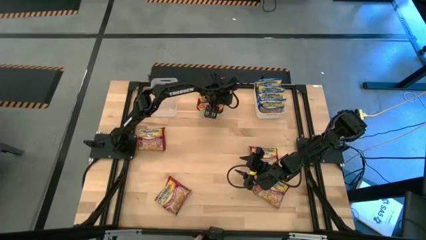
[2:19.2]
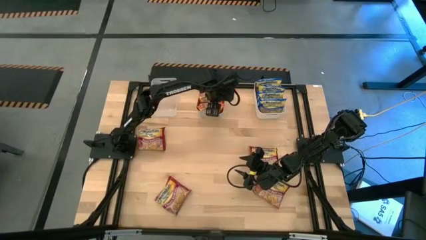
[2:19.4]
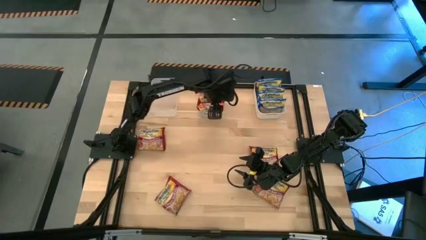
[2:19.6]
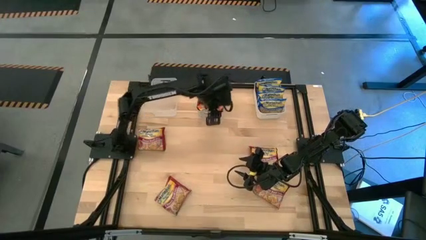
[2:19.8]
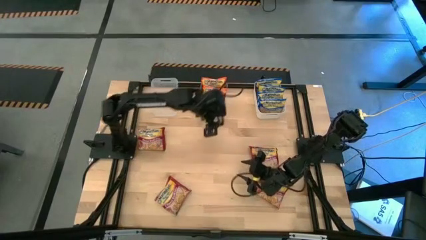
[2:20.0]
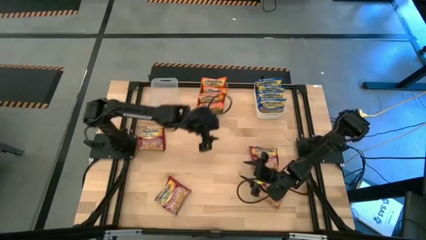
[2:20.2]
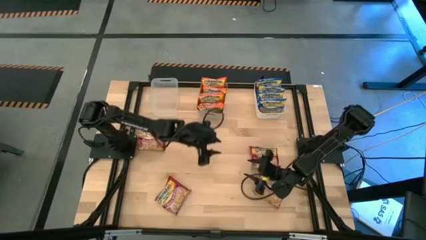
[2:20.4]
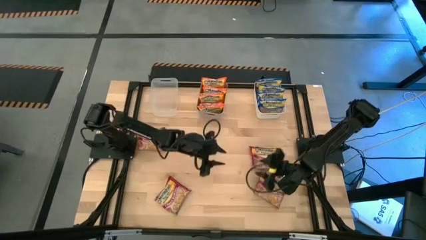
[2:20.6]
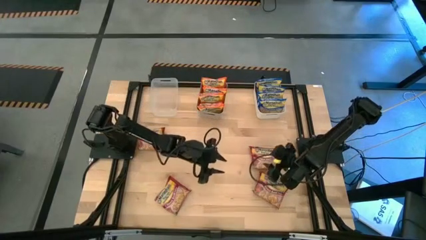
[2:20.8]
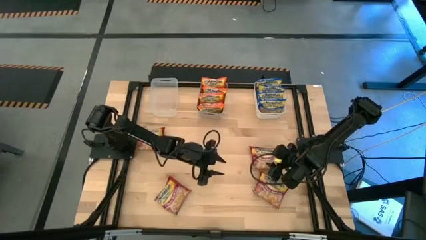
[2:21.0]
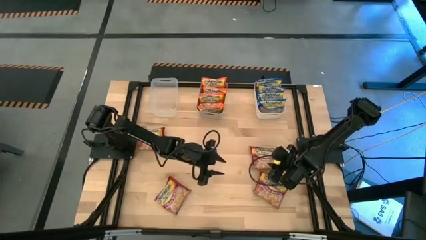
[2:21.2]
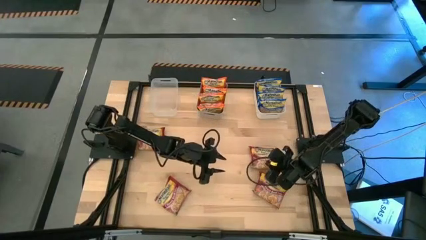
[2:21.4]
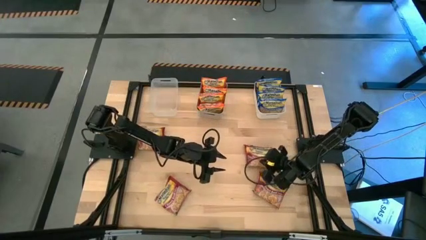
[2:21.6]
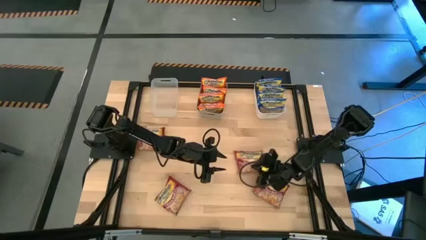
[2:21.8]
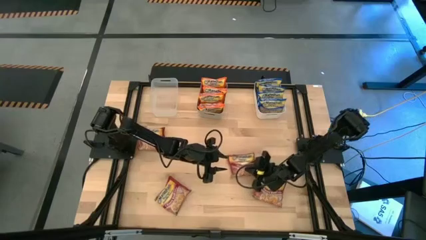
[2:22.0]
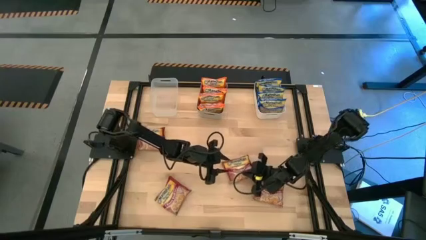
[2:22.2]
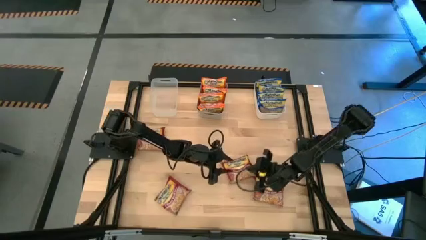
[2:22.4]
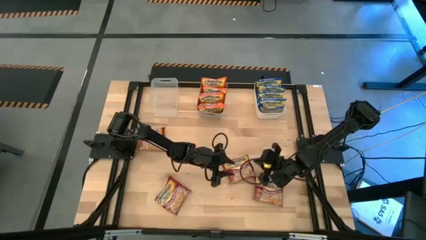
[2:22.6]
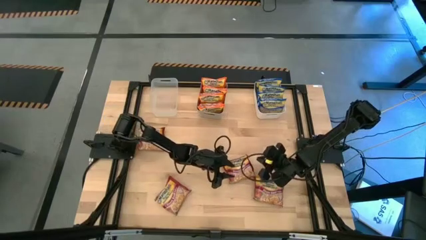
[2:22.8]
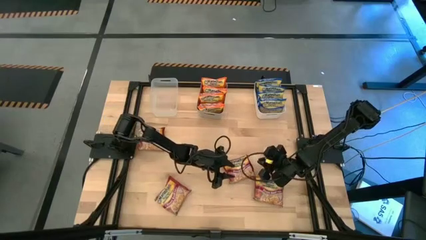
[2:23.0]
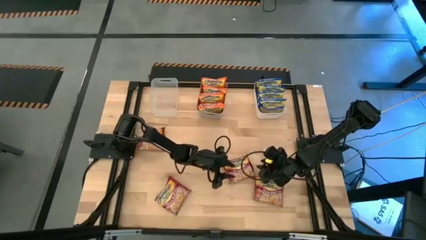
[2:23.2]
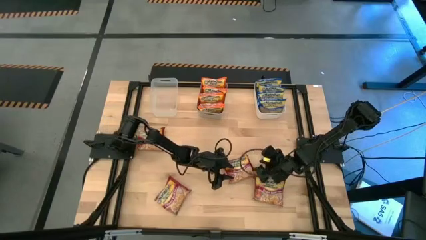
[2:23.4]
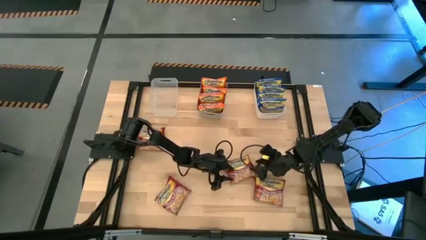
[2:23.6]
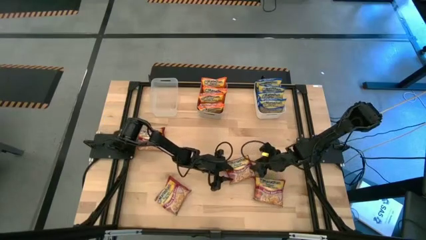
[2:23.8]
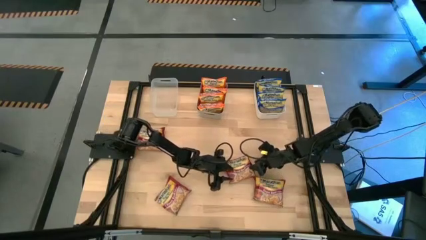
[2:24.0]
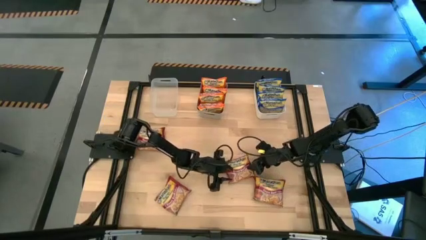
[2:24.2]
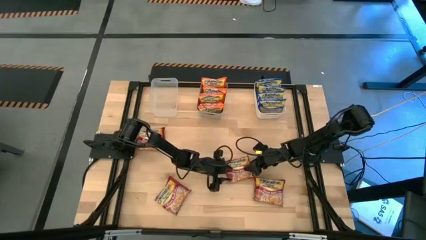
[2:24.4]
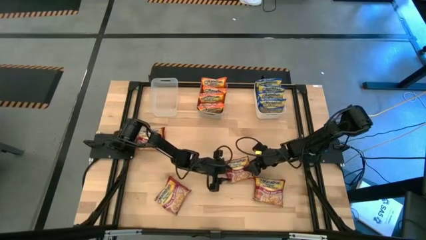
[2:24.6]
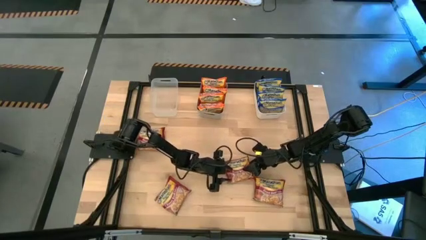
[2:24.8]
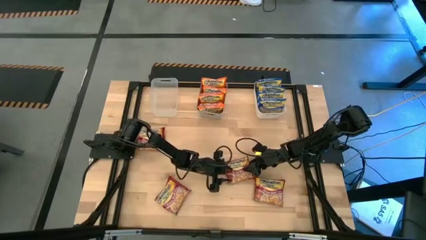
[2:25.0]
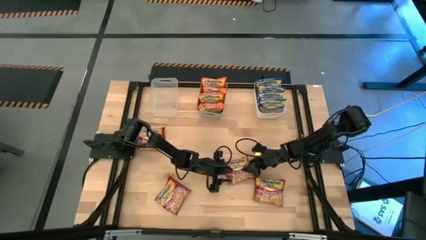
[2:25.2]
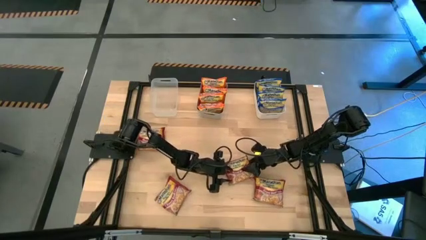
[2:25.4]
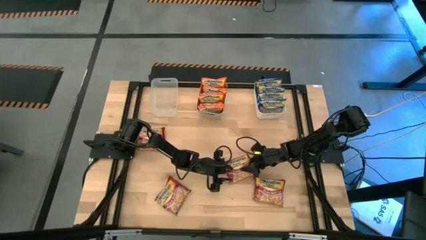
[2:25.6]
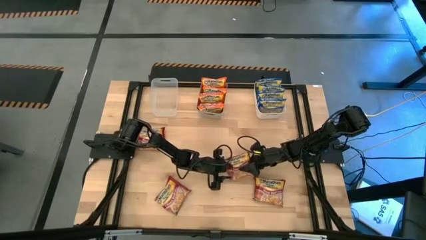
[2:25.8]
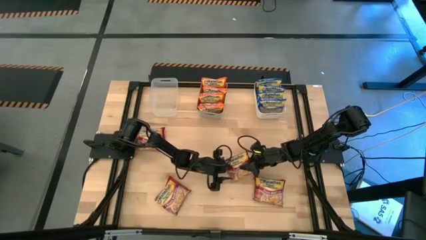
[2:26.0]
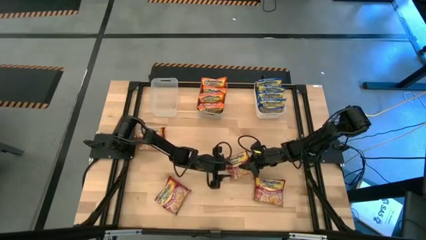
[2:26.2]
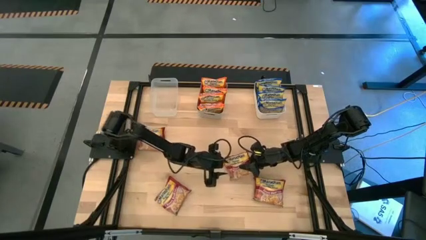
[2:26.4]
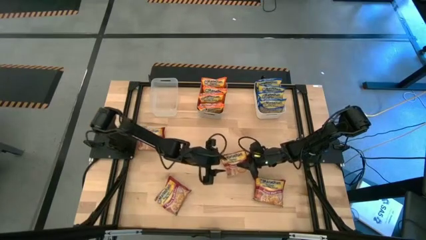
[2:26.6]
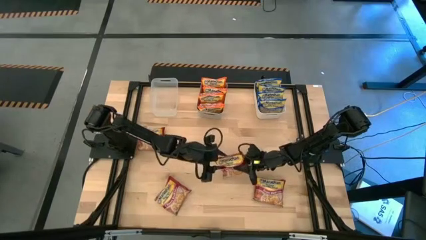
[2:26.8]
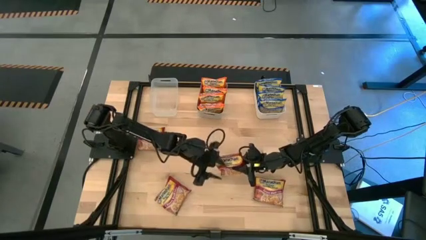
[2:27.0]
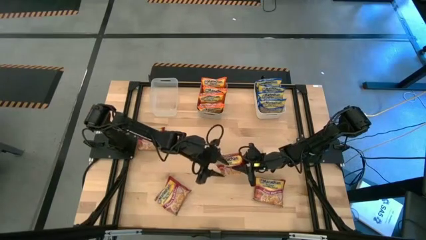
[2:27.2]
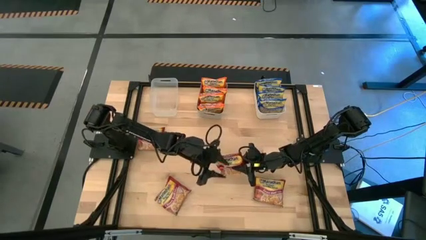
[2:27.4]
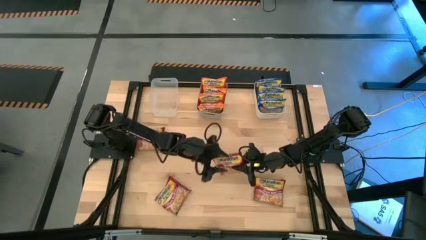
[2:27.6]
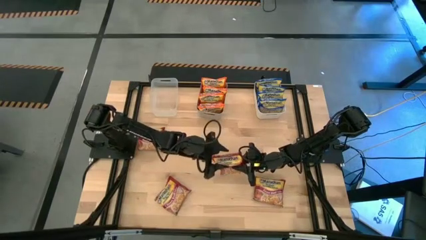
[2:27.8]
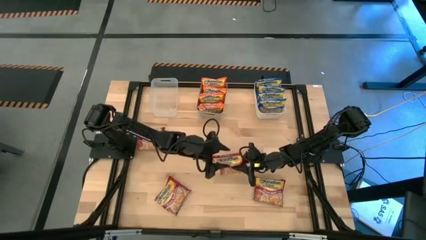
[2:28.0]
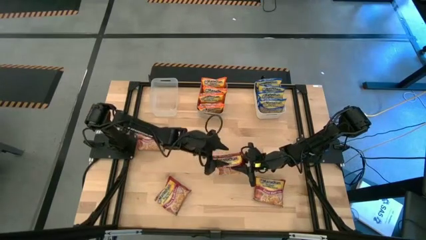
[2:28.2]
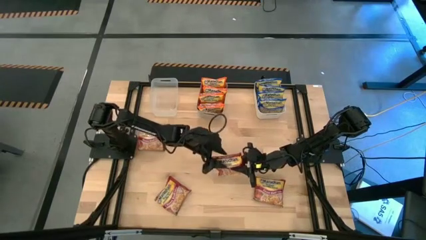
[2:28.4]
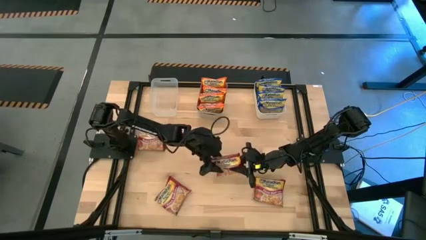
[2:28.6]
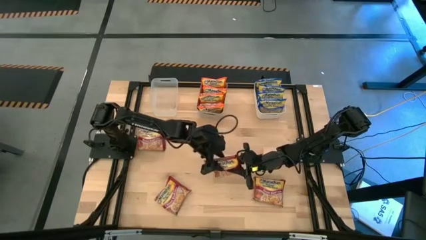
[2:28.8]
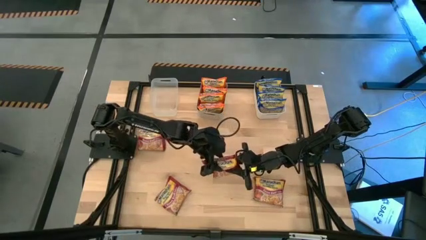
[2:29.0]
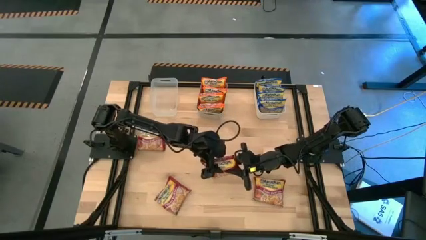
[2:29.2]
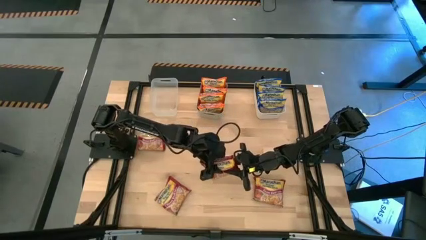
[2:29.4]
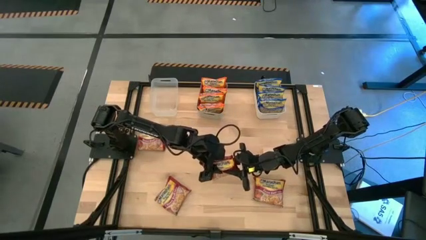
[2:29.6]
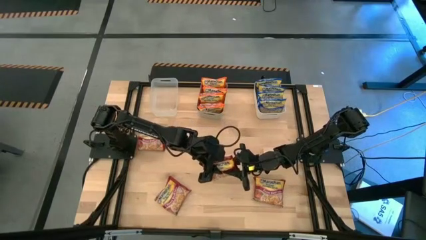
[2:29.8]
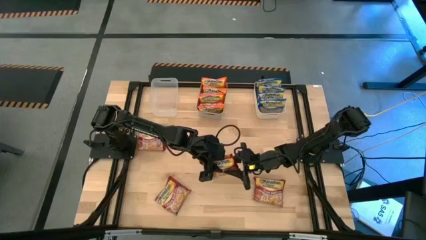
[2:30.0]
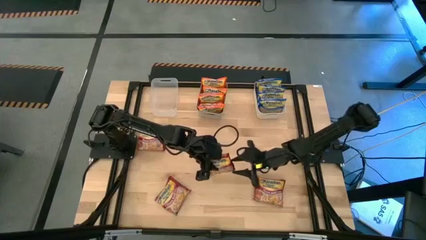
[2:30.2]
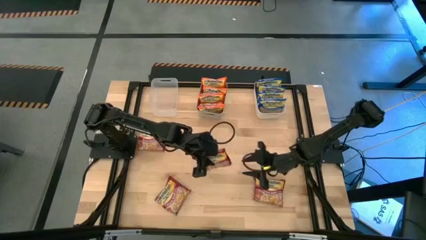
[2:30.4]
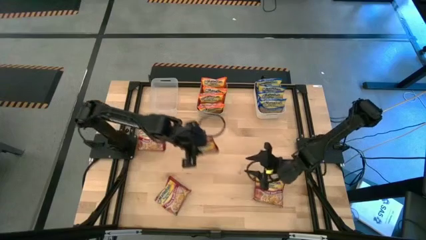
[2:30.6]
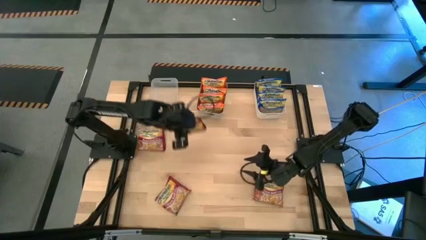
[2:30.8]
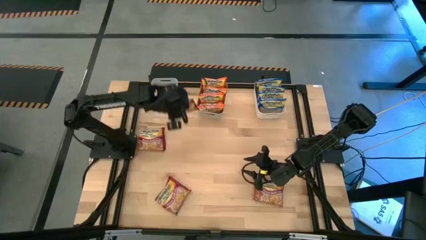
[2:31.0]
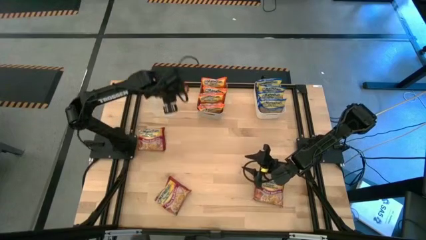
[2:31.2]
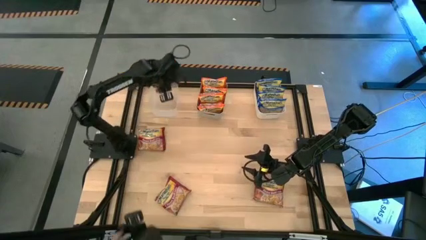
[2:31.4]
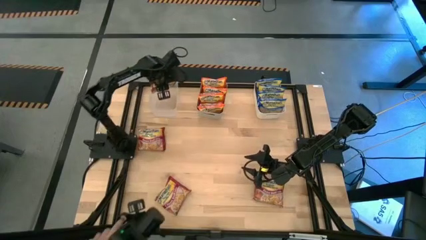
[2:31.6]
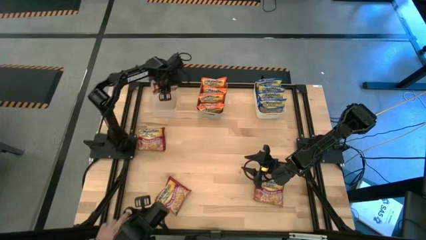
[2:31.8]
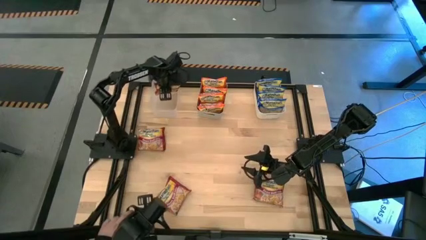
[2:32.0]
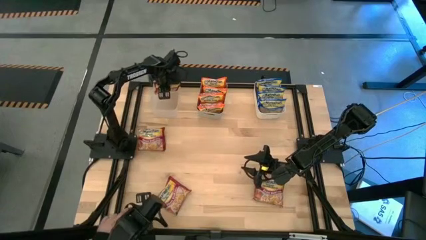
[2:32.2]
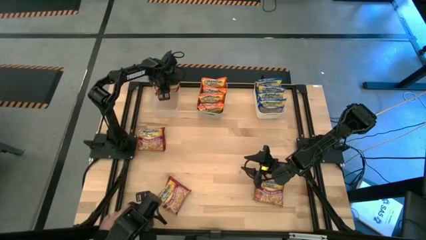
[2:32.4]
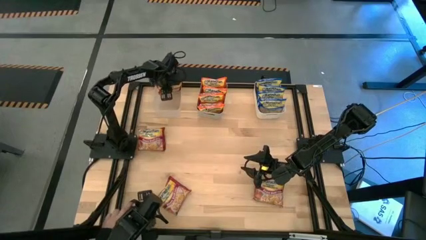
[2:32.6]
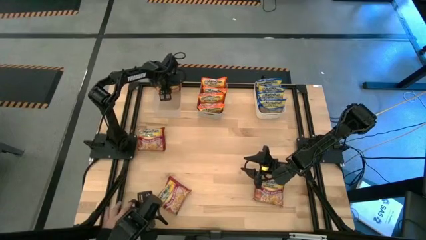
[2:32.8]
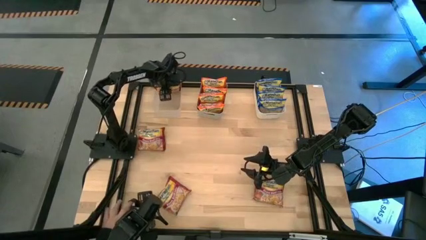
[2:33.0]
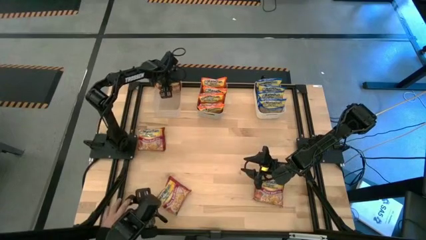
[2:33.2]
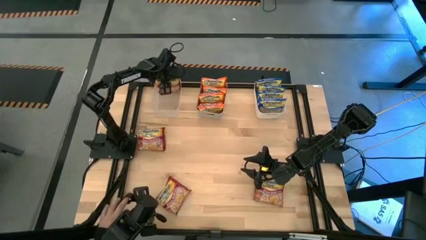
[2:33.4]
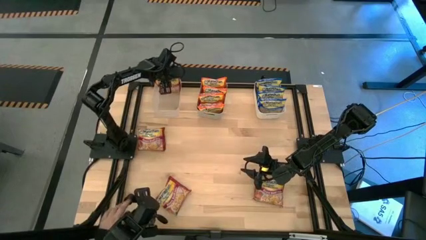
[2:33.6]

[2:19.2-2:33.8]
Task: Sort Maruchan noodles
Put the red noodle pack into the transparent bin

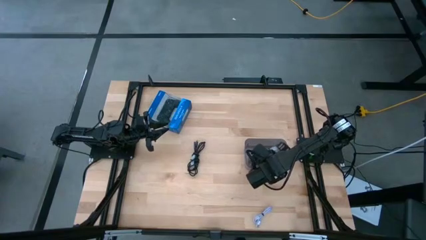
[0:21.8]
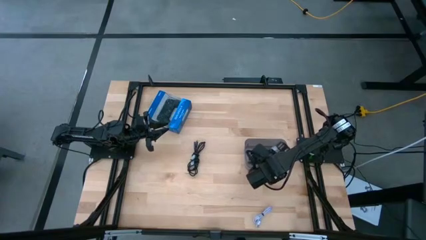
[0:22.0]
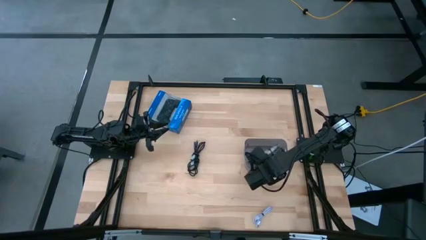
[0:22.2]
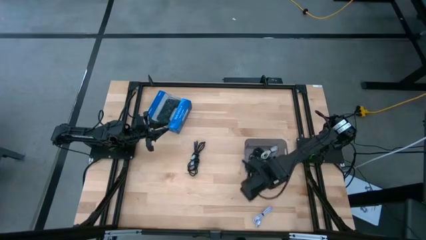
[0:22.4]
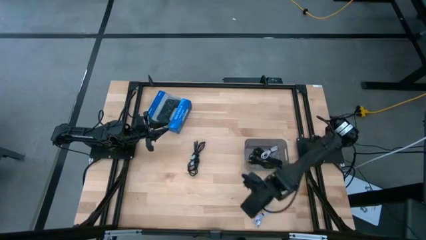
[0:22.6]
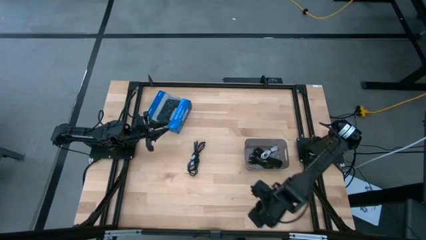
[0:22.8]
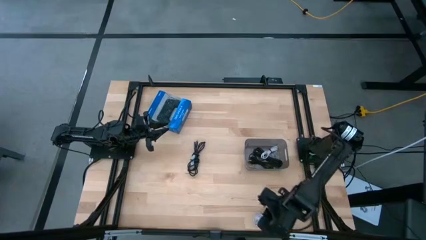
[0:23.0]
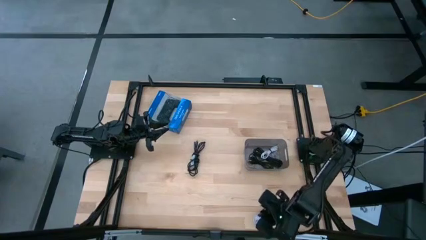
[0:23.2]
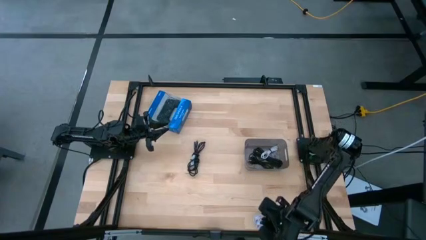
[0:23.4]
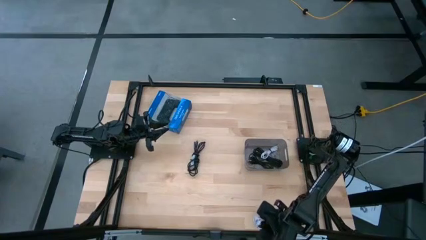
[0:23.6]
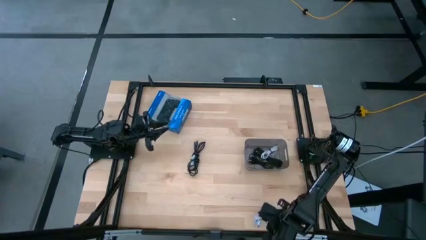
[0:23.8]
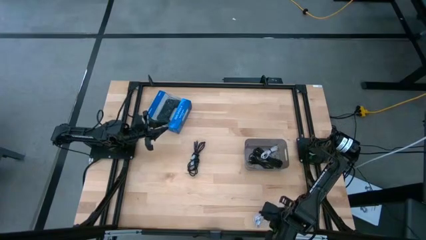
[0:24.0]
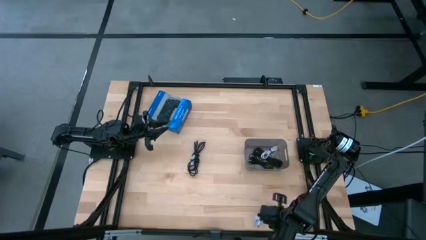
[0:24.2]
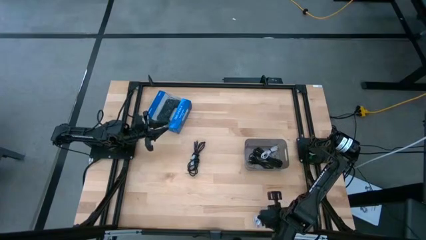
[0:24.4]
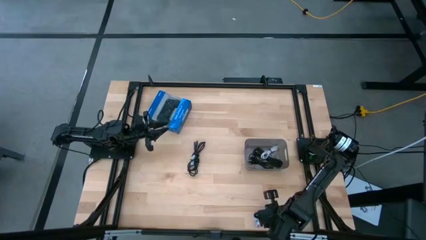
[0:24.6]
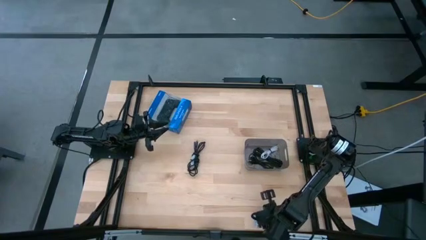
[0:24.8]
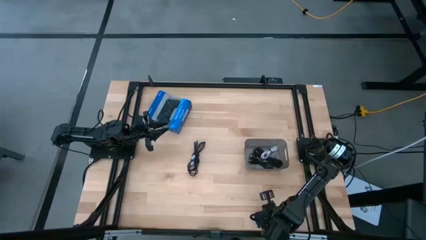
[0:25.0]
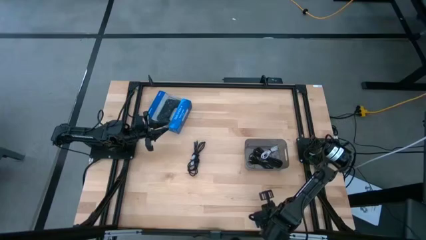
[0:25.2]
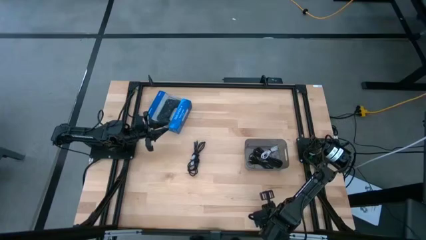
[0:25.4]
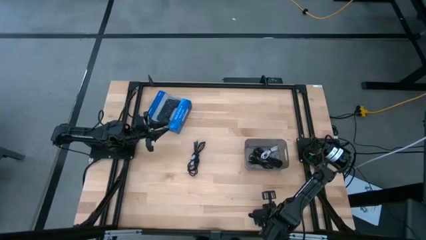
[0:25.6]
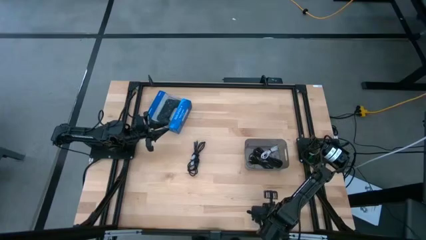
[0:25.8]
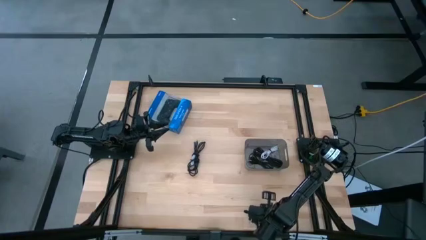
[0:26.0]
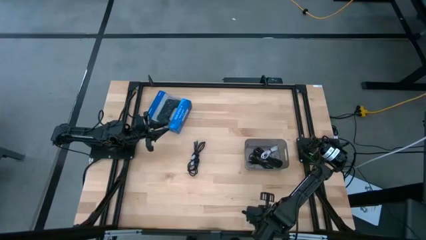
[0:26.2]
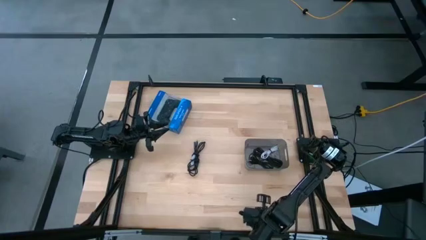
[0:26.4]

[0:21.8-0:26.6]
Task: Pick and place USB-C Cables
Put the light purple charger cable into the black bin
